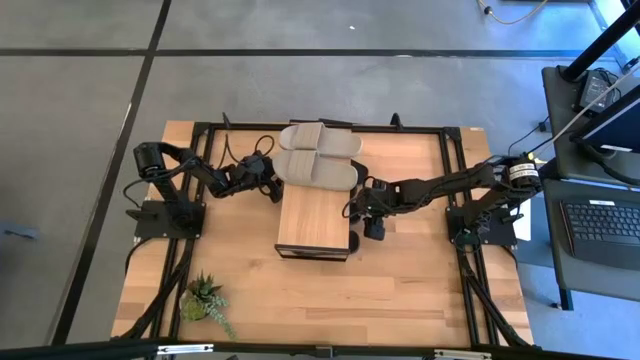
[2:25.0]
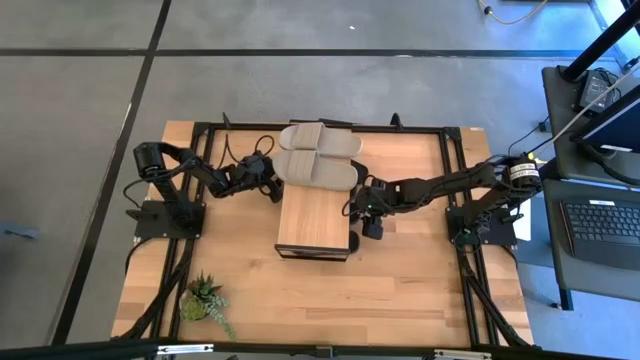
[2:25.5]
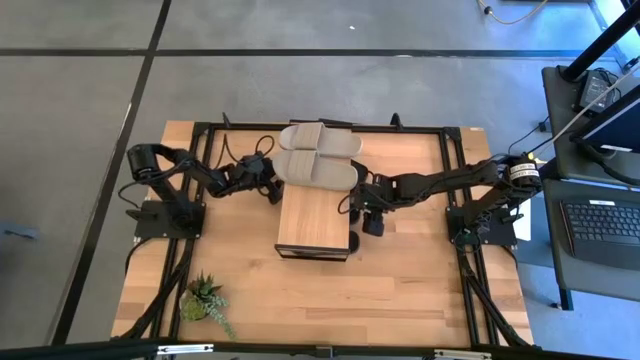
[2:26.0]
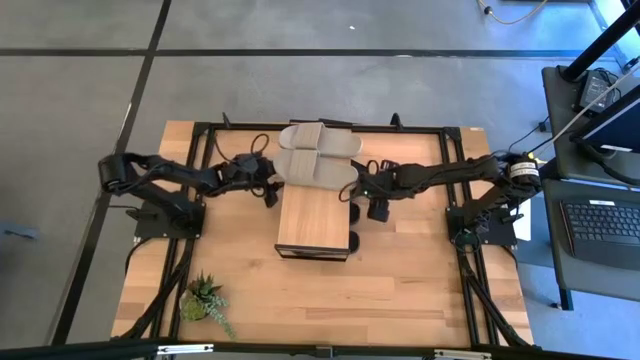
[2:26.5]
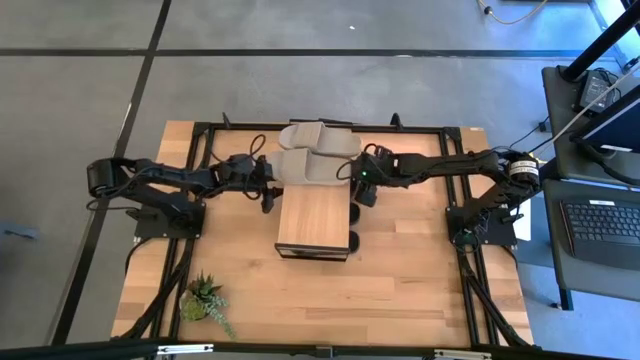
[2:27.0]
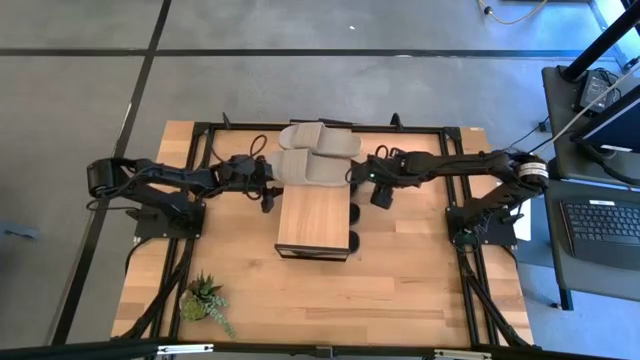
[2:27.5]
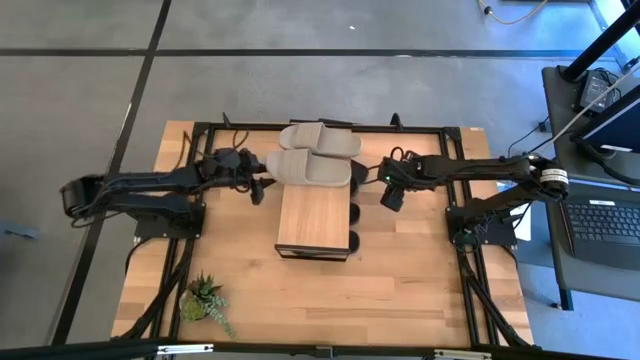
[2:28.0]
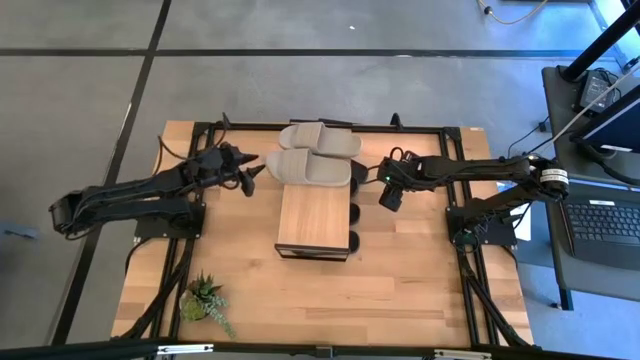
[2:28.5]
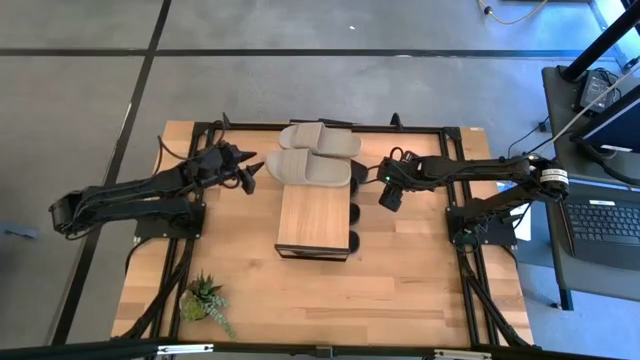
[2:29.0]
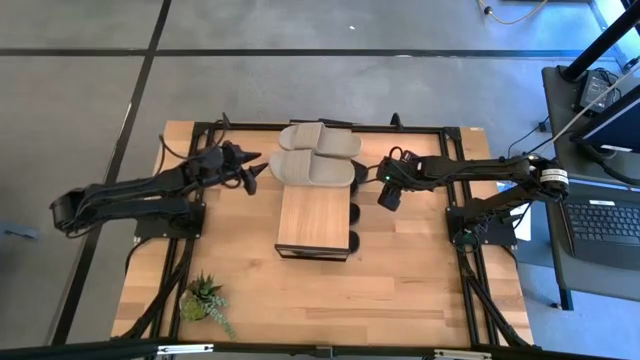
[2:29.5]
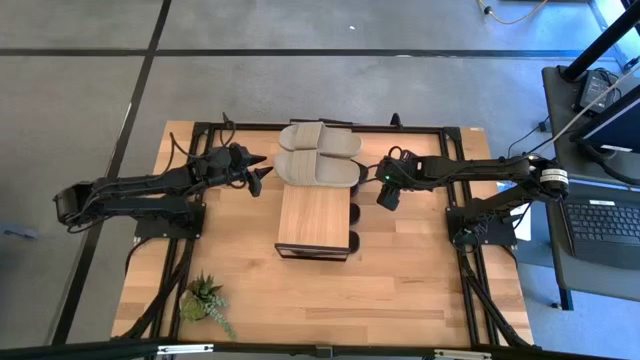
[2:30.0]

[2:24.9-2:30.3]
Task: Pick and place slides into the shelf
Adjust the gray slide on the shelf

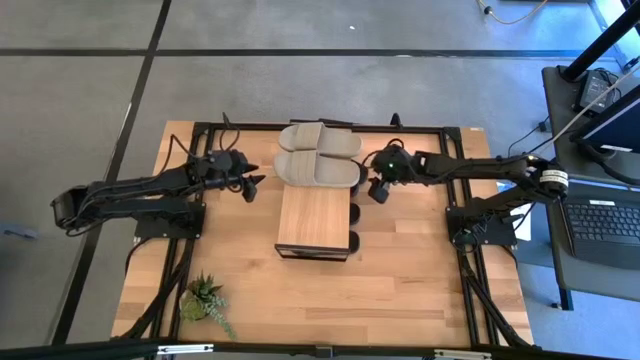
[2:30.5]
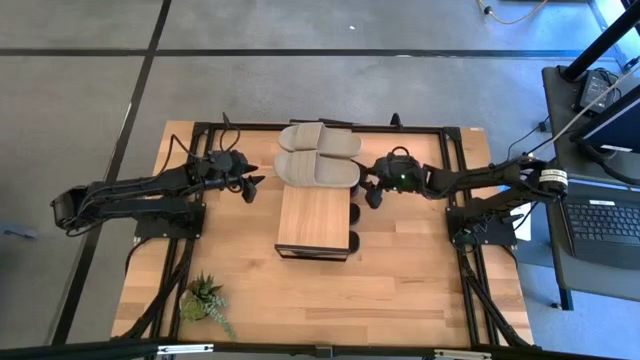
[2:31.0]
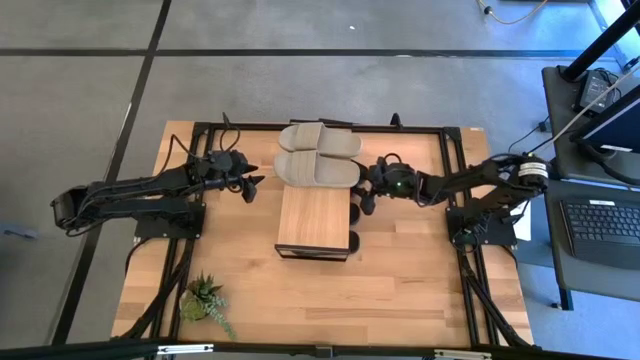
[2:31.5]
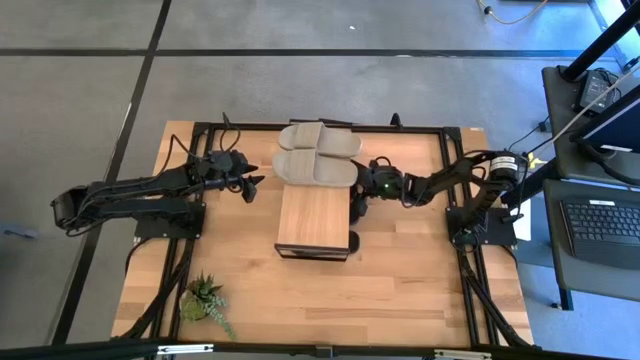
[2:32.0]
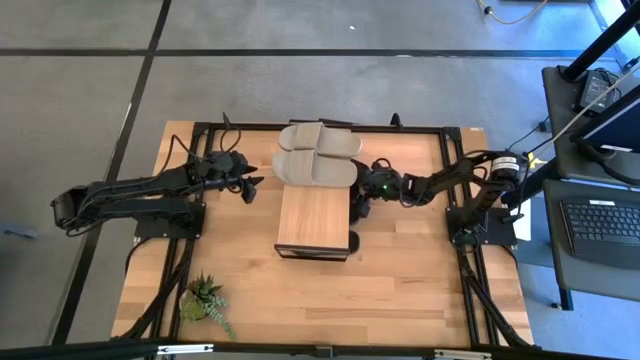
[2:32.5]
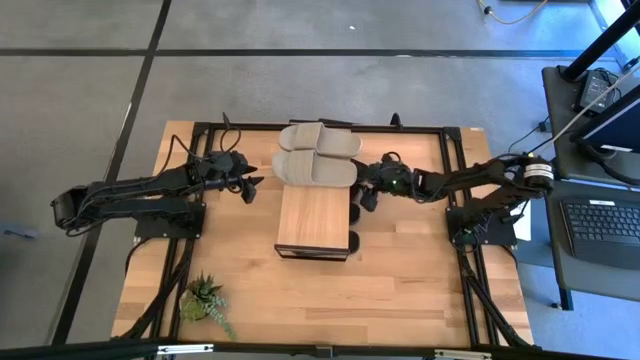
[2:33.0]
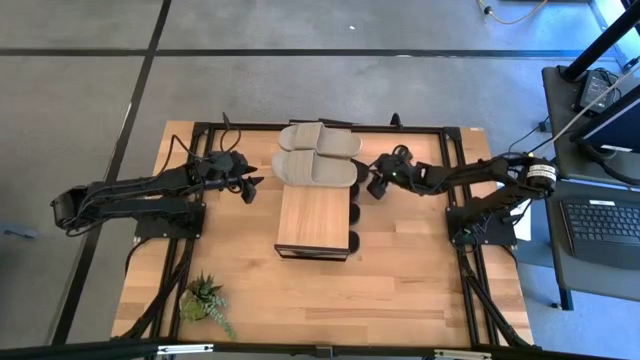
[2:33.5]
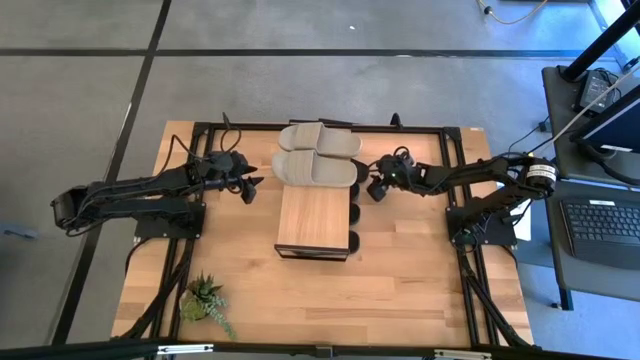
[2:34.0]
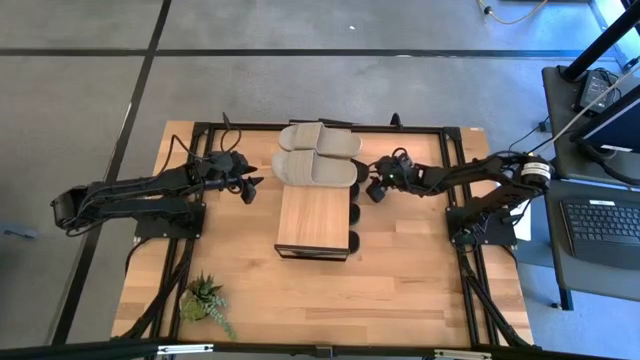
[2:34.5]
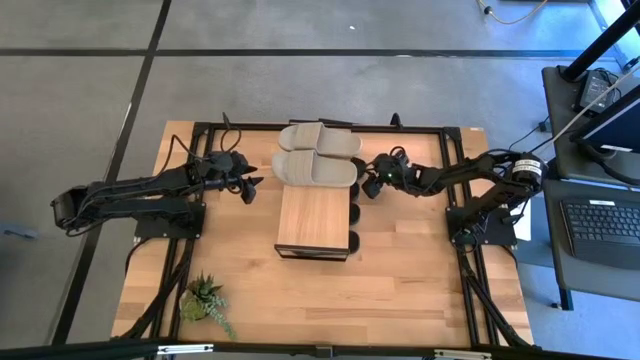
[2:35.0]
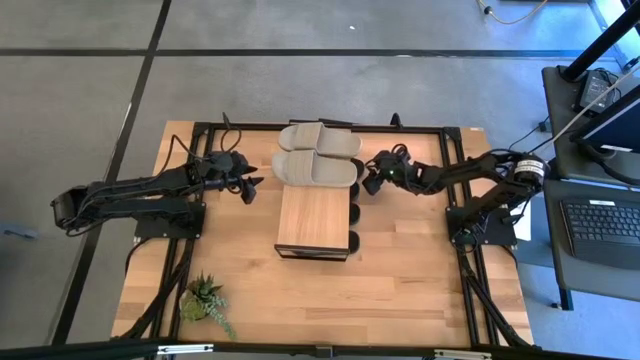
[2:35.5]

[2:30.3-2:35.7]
Adjust the black slides under the shelf

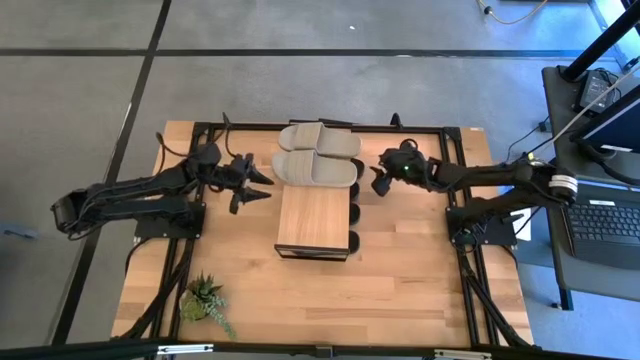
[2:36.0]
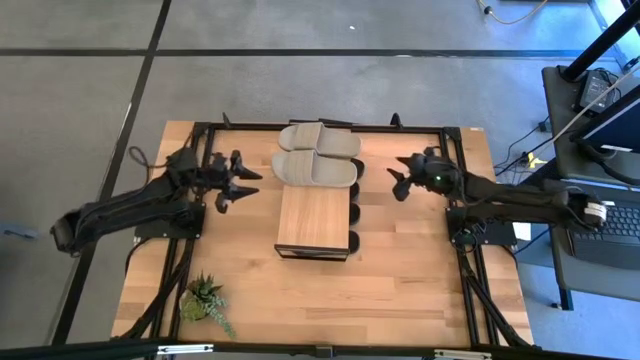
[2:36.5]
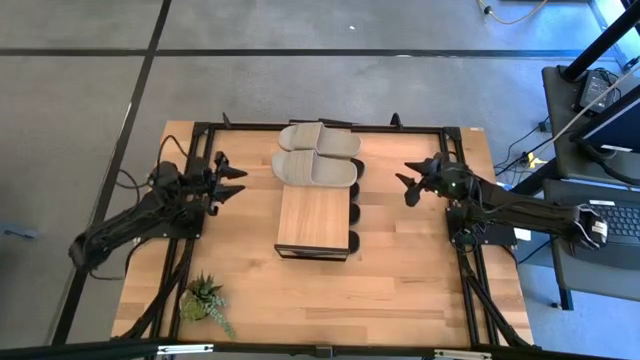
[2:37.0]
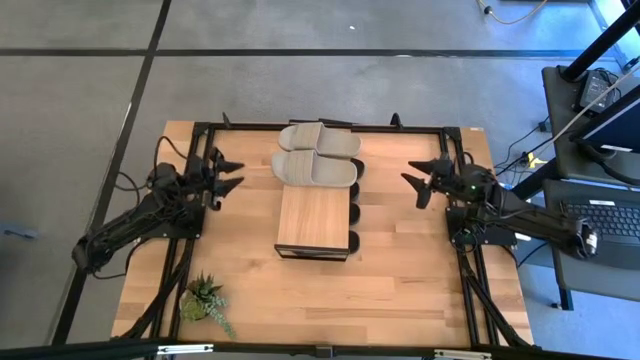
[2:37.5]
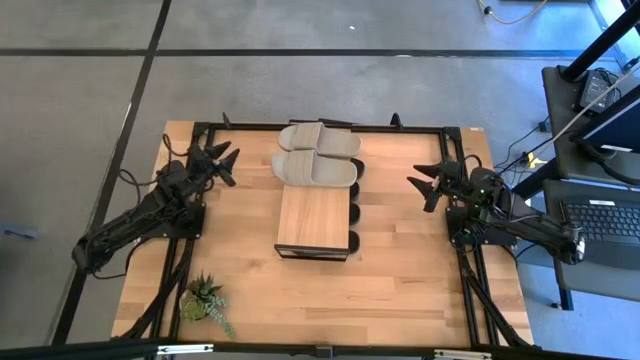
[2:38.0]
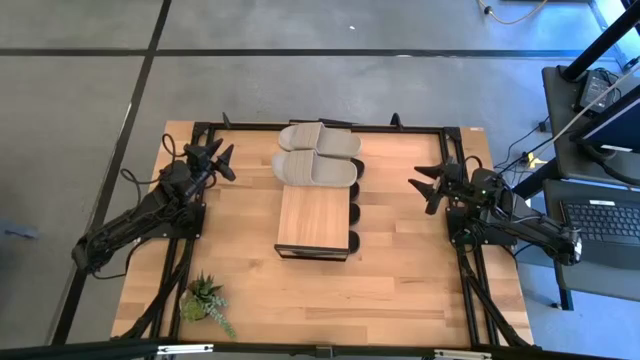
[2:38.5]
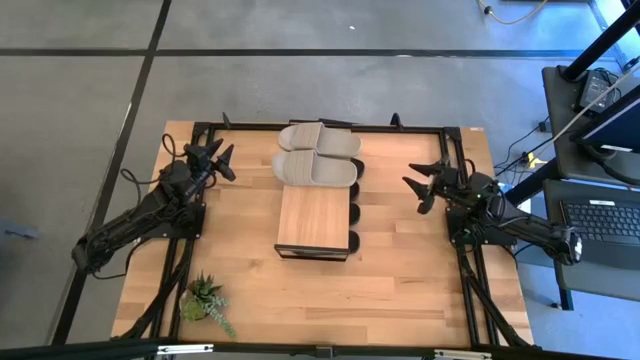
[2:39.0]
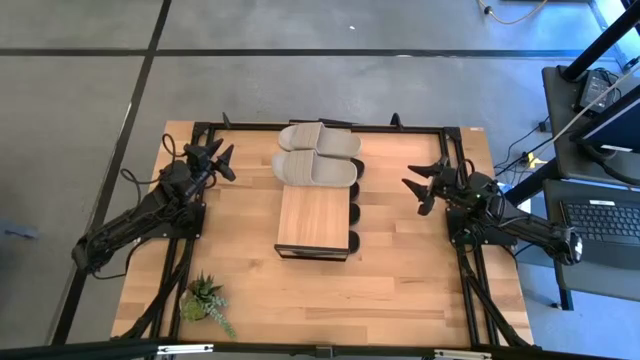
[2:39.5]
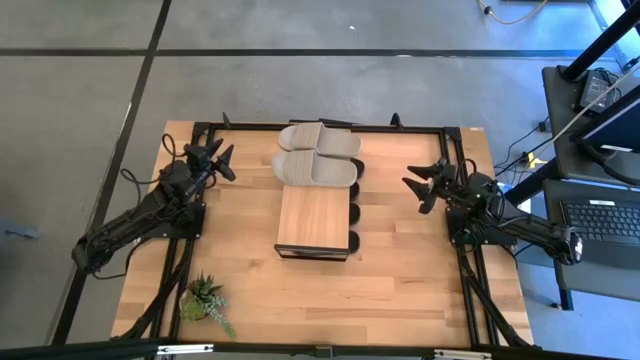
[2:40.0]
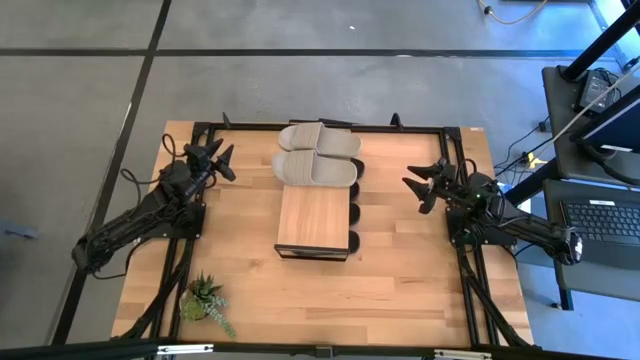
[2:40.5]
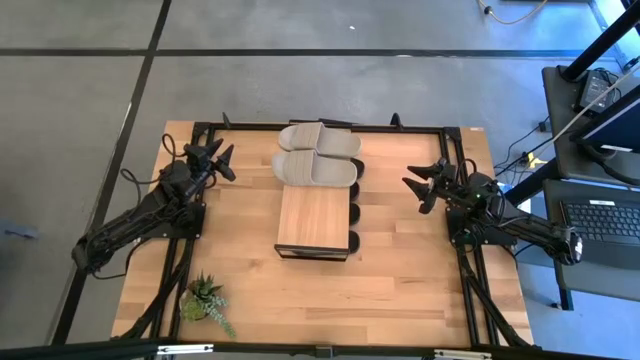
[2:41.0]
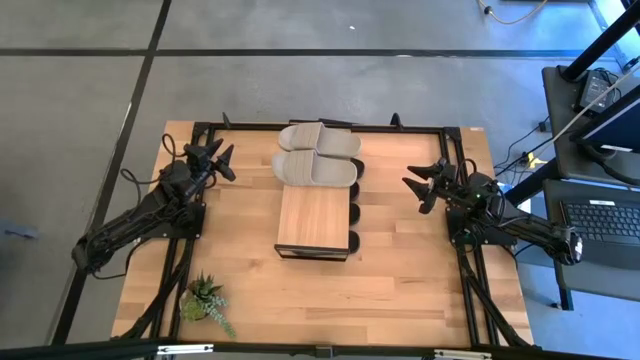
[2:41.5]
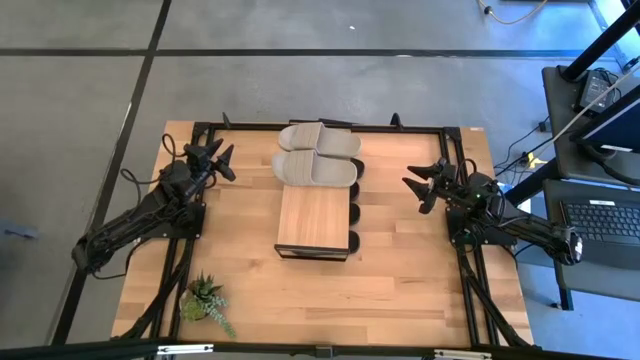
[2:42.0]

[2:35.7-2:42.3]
Return to Home Position

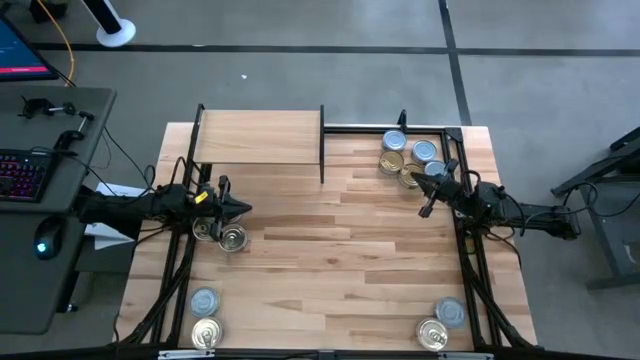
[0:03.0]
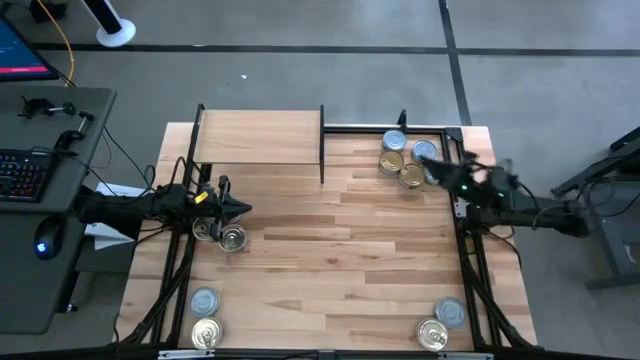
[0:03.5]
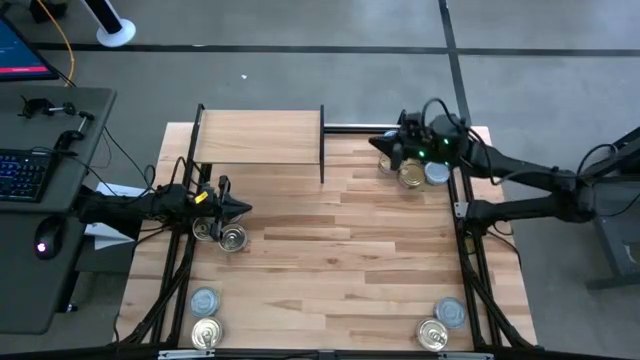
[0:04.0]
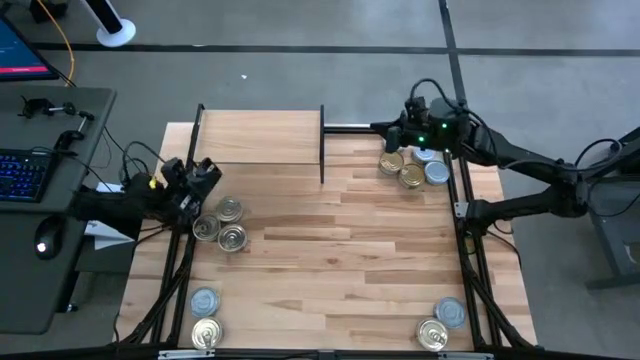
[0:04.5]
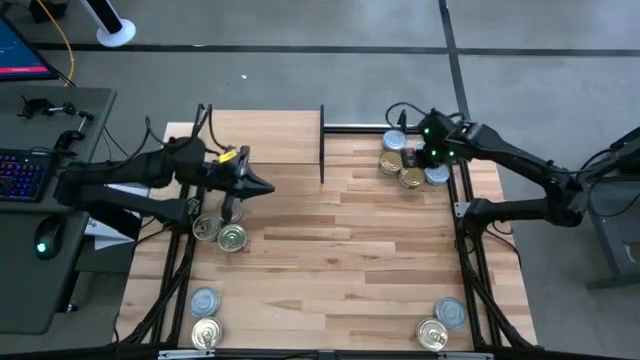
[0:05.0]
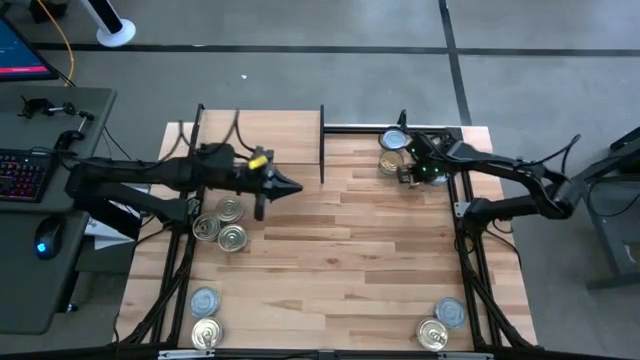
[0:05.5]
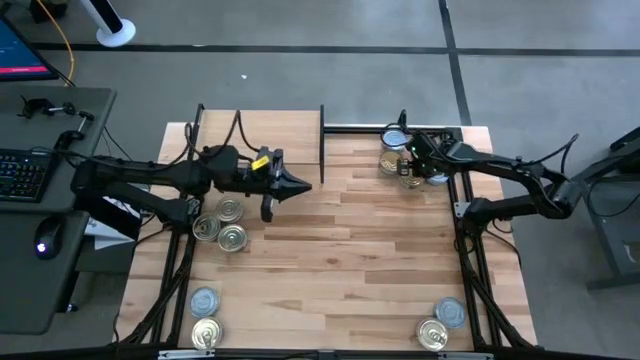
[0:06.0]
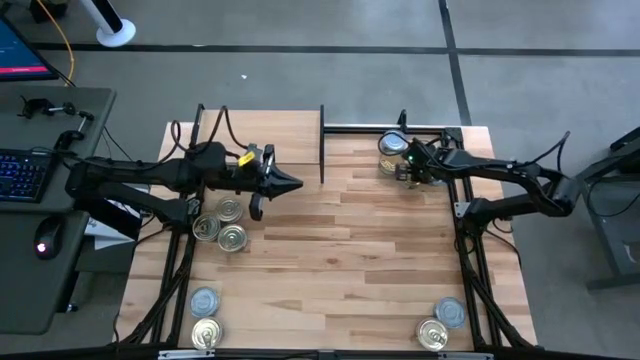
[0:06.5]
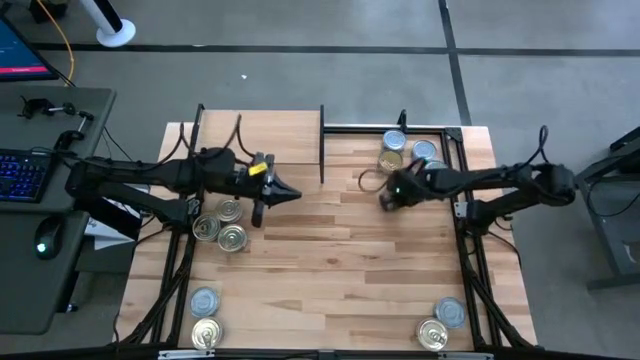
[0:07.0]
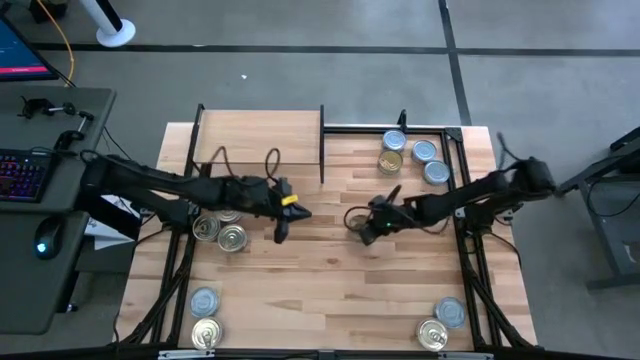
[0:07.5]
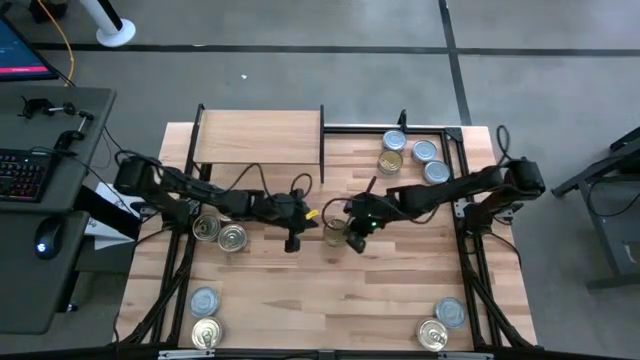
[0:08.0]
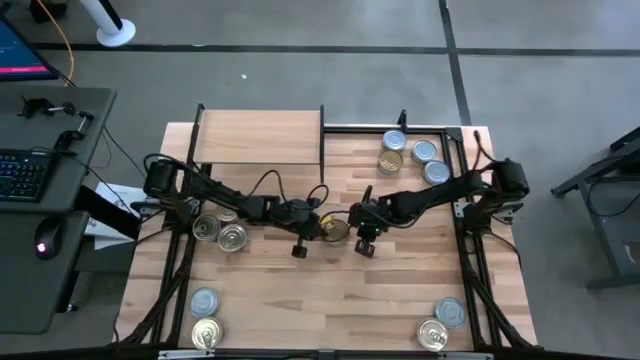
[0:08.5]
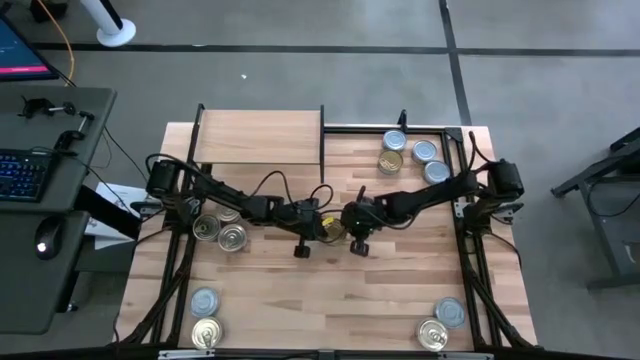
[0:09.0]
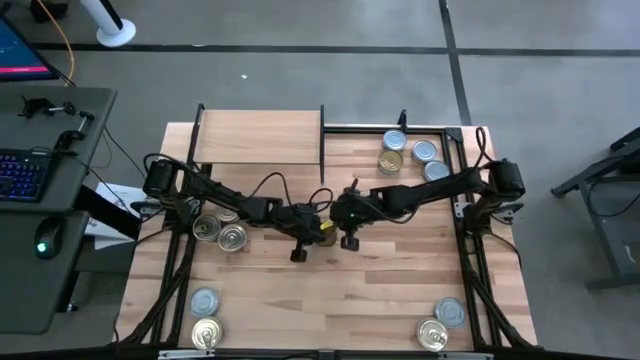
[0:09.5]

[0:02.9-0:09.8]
Task: Stack canned seafood by type on shelf
Put the green tuna can on the shelf
